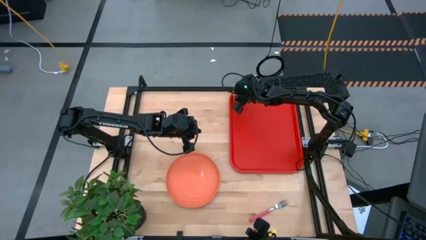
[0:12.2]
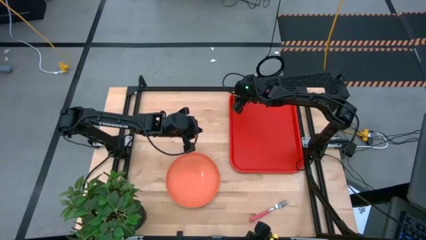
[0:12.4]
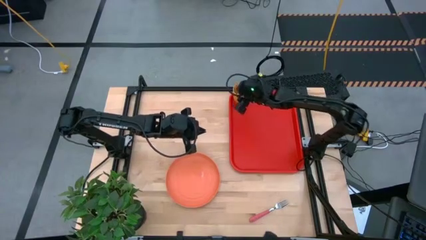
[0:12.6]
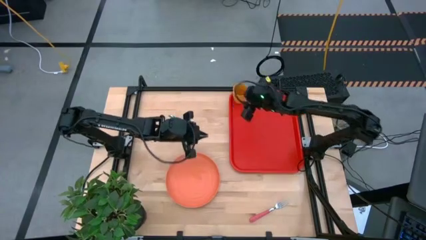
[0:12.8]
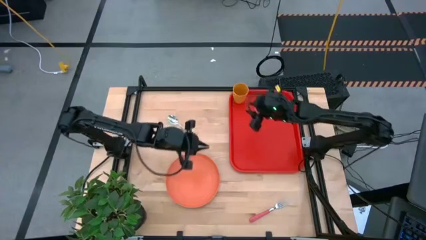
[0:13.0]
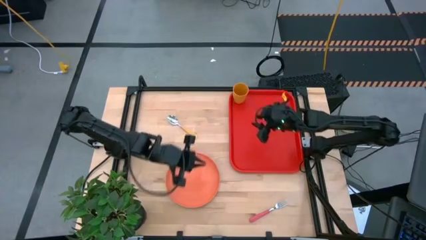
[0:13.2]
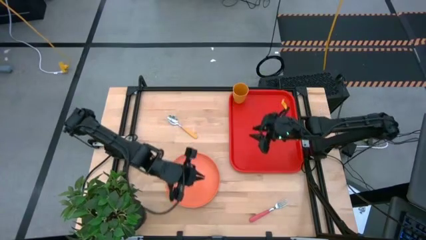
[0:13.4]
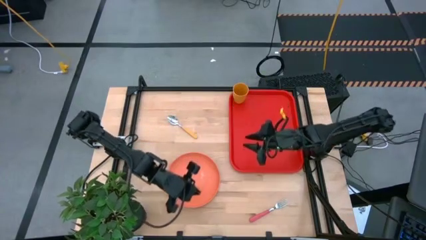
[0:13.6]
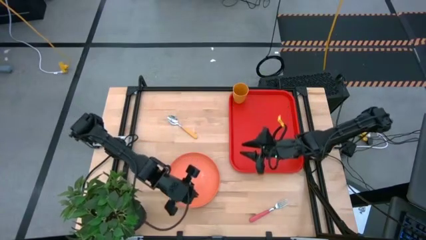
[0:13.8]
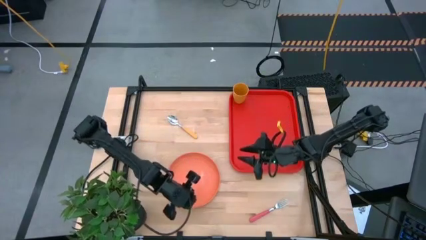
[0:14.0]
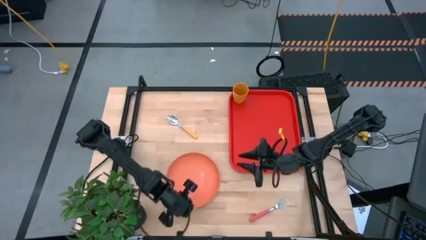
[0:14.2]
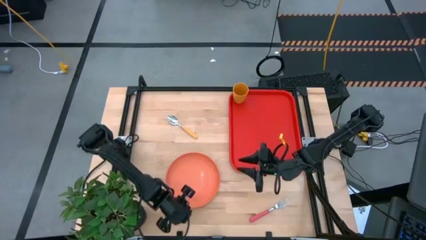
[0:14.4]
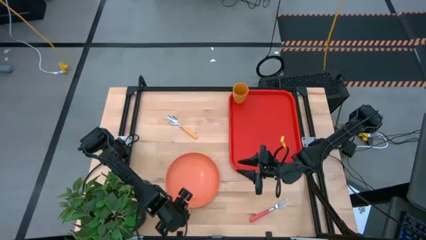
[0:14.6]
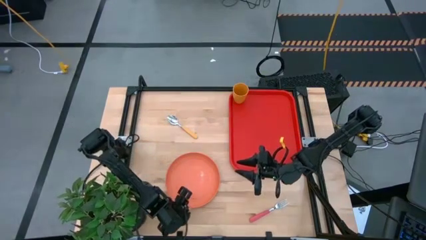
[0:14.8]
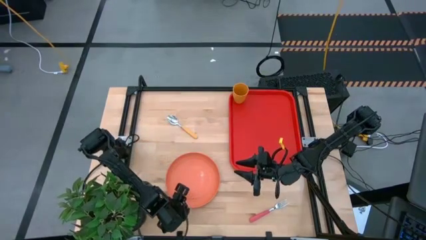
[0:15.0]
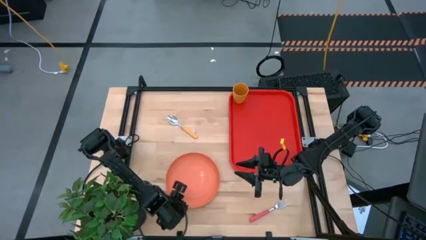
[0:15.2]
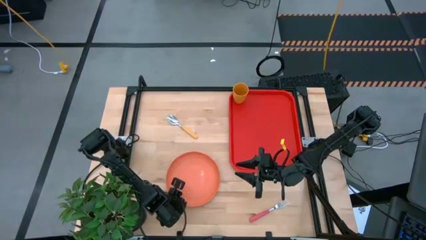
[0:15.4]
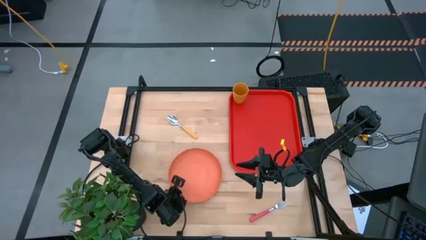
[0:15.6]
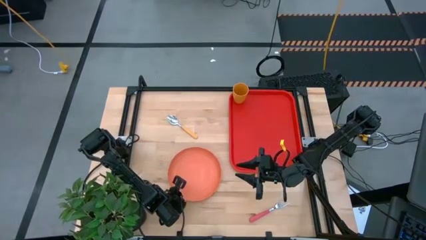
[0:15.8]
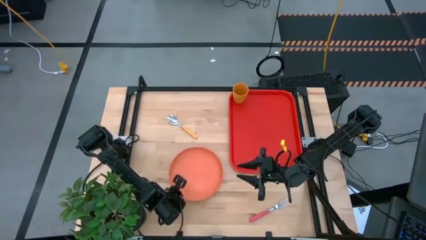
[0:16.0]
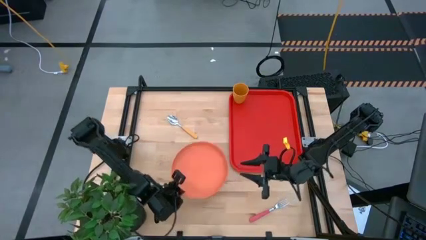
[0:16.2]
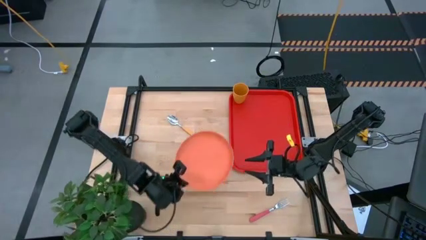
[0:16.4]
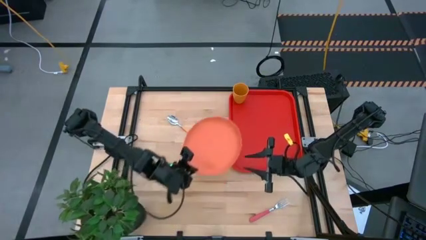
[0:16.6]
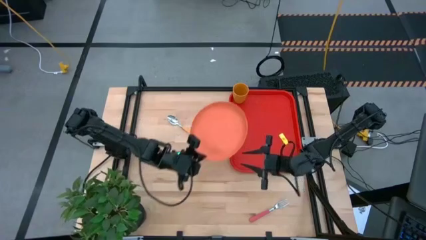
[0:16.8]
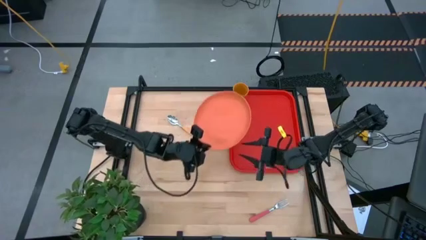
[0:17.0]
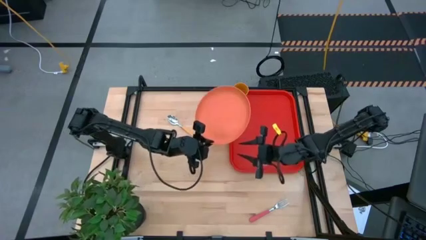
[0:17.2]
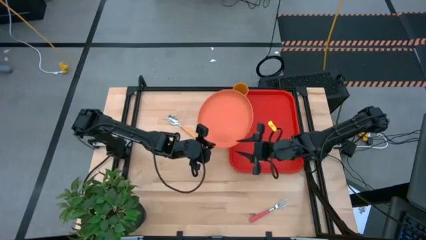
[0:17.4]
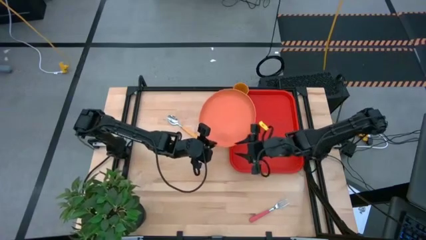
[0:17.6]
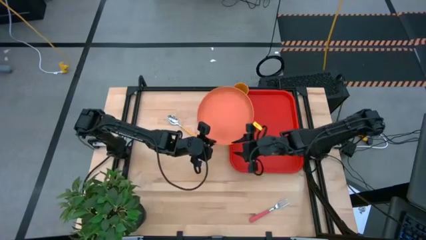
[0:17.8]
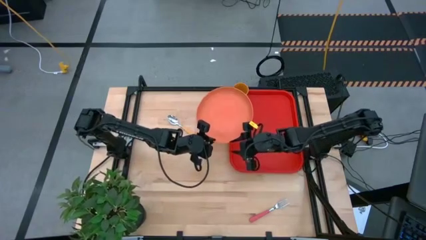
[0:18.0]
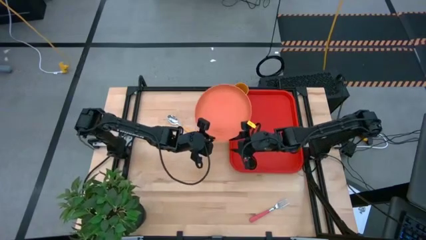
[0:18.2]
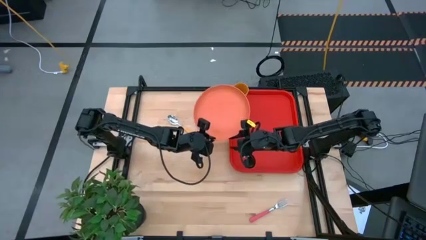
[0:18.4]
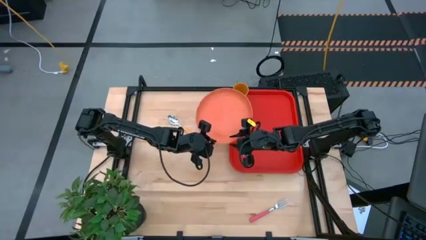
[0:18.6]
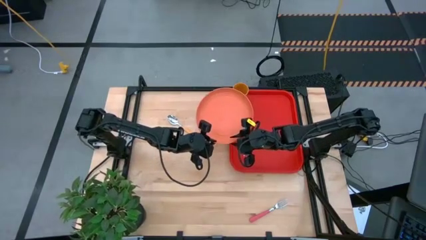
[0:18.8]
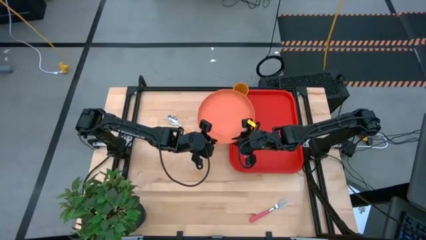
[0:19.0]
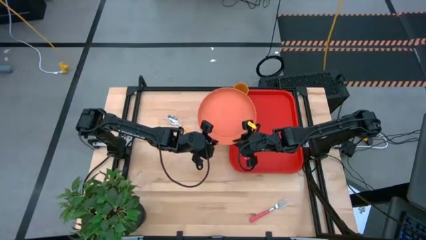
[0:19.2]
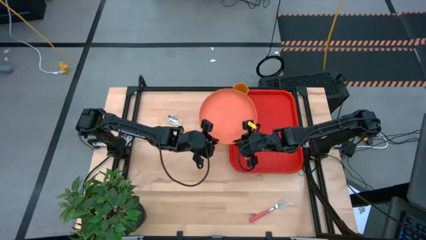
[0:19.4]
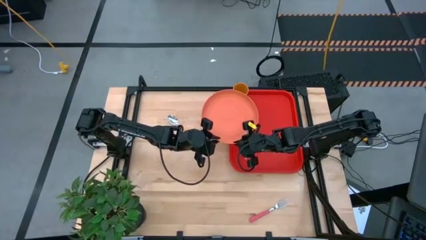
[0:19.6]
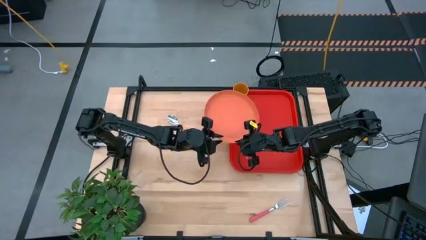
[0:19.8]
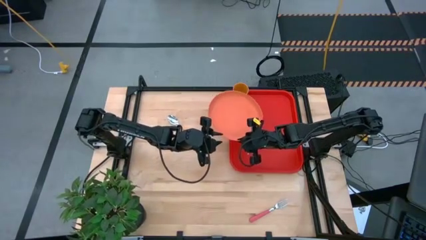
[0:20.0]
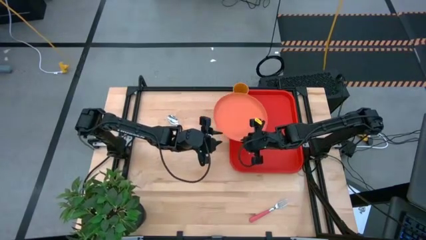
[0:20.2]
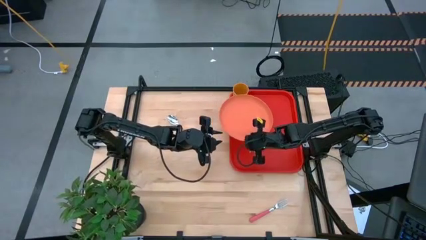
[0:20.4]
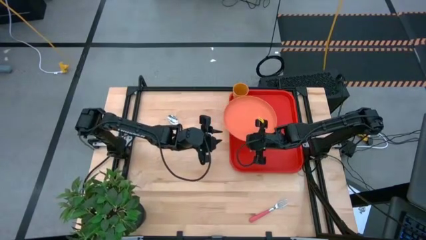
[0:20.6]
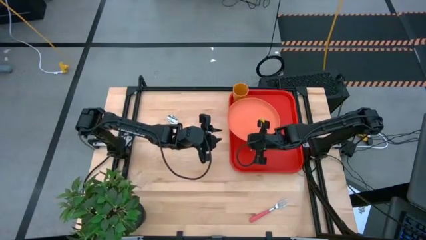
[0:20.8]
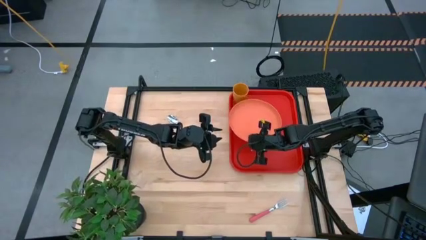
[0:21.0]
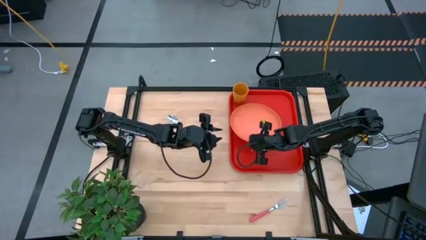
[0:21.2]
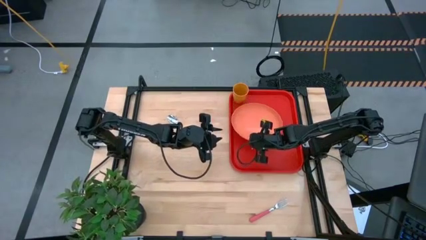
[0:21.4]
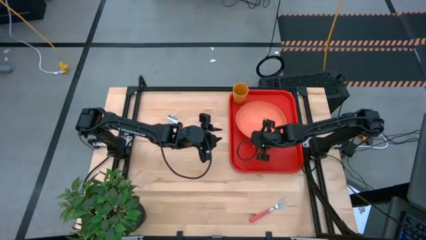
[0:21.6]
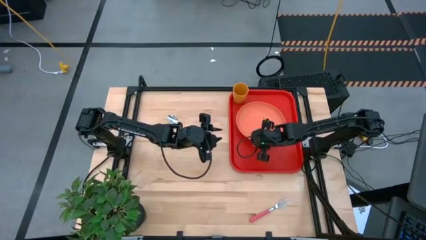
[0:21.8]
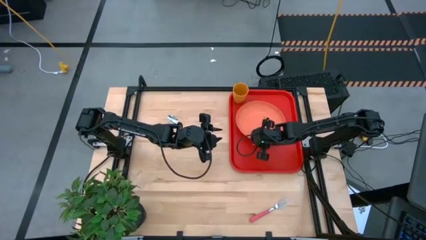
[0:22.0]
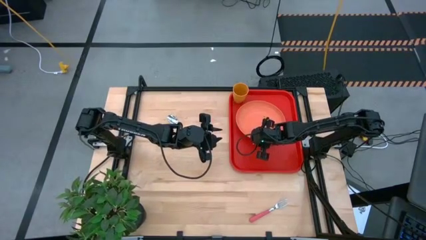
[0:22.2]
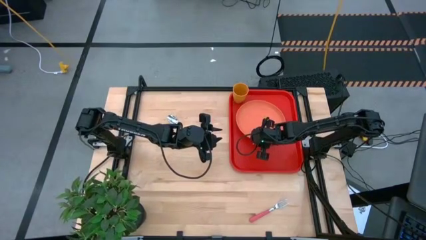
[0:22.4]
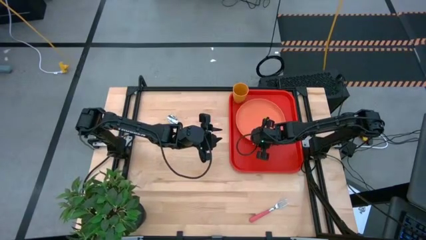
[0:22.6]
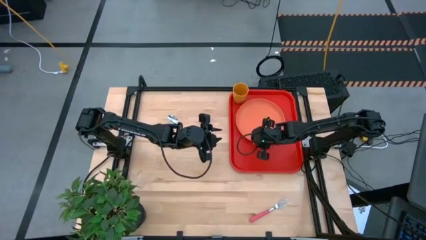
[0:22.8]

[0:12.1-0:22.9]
Task: Pick and place plate/cup/fork/spoon on tray
Put the orange plate on the red table tray to the bottom of the orange cup

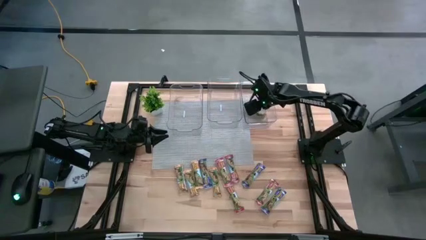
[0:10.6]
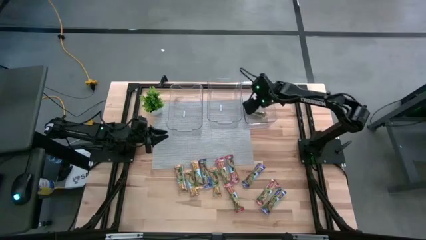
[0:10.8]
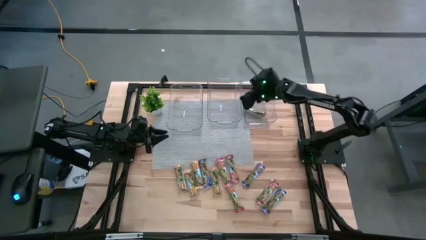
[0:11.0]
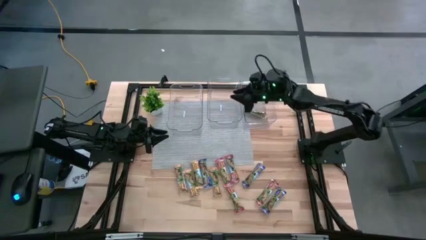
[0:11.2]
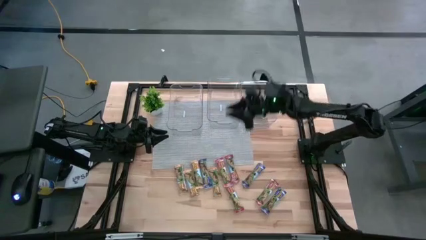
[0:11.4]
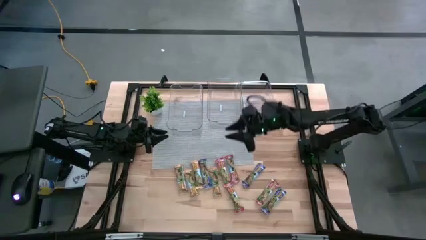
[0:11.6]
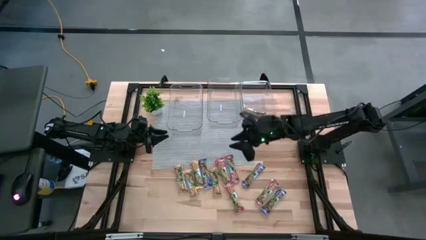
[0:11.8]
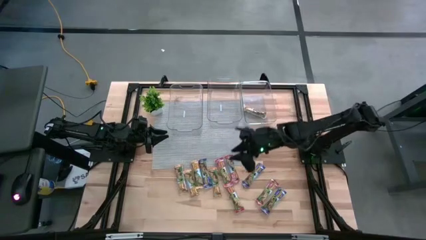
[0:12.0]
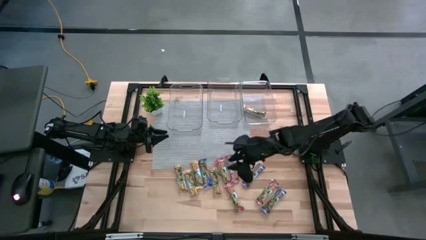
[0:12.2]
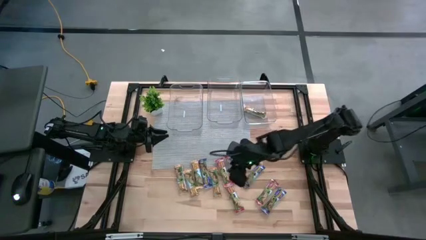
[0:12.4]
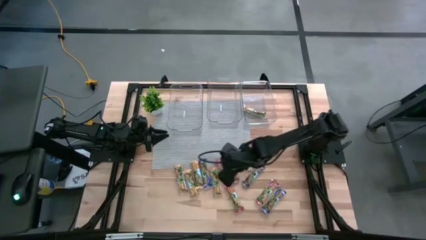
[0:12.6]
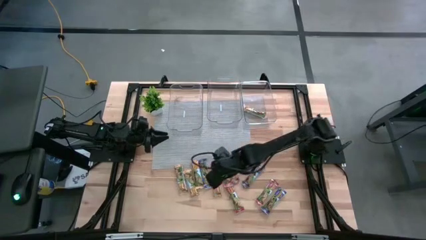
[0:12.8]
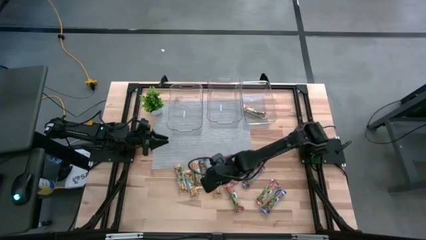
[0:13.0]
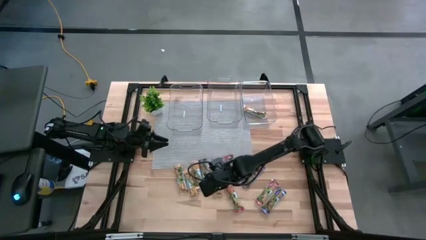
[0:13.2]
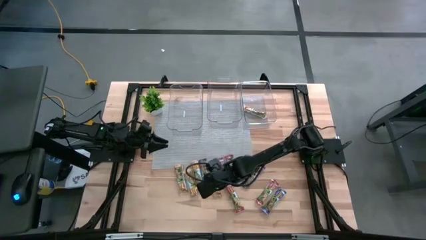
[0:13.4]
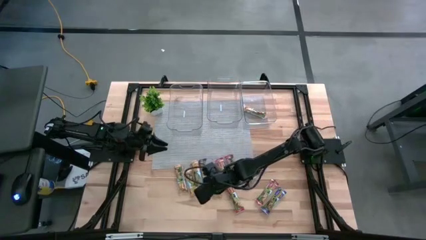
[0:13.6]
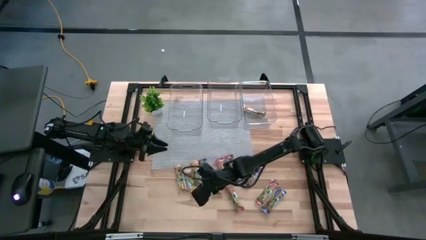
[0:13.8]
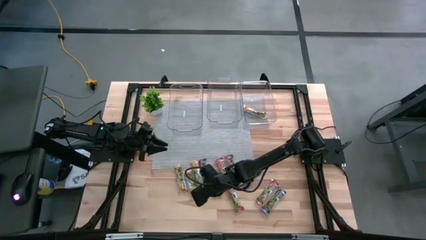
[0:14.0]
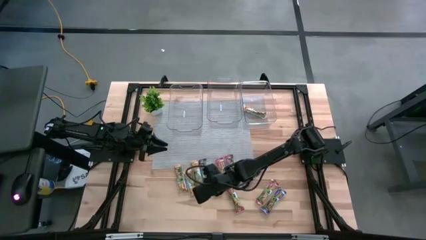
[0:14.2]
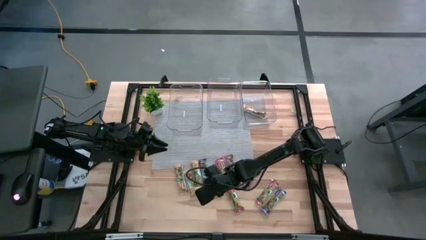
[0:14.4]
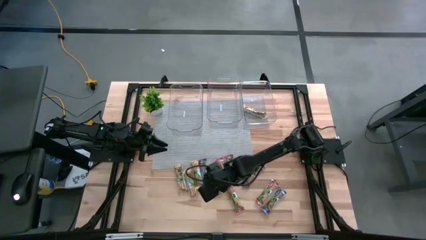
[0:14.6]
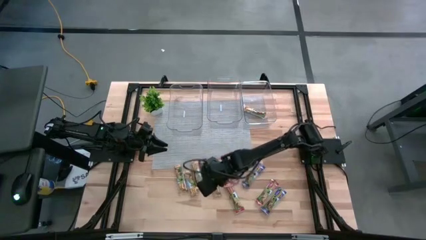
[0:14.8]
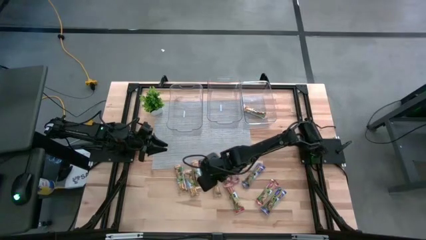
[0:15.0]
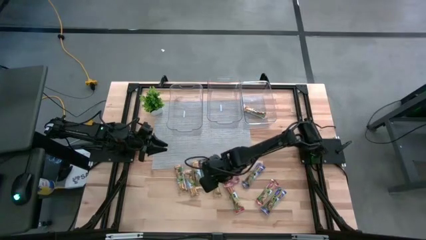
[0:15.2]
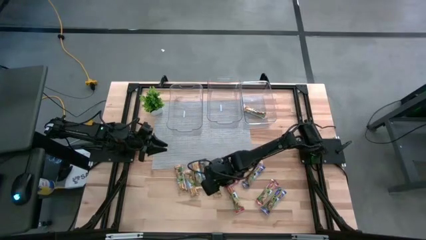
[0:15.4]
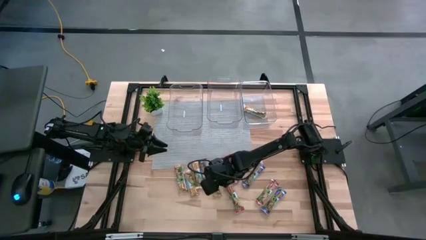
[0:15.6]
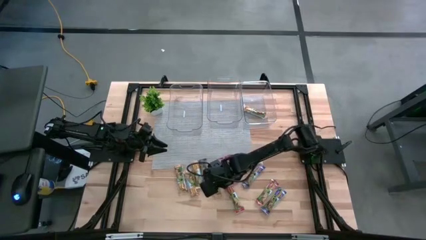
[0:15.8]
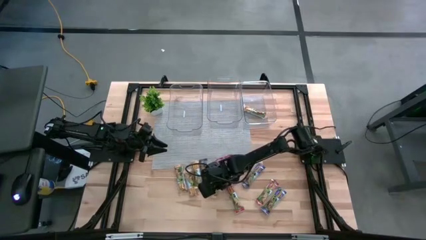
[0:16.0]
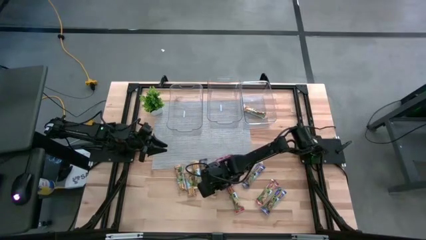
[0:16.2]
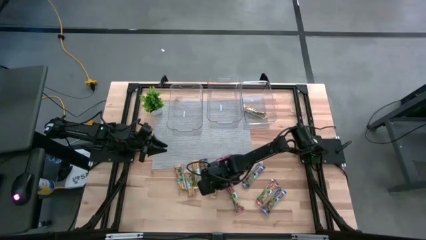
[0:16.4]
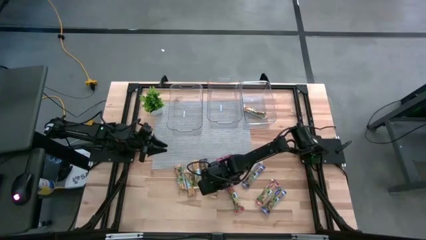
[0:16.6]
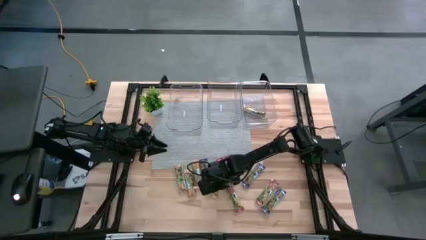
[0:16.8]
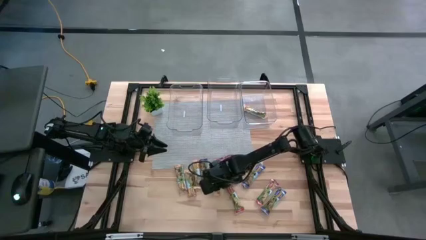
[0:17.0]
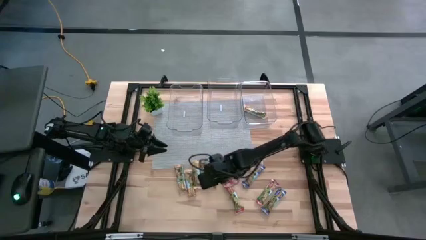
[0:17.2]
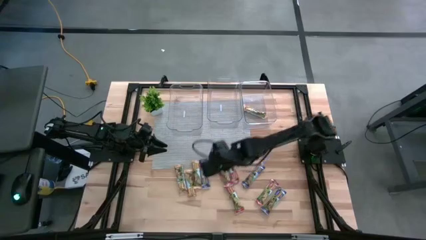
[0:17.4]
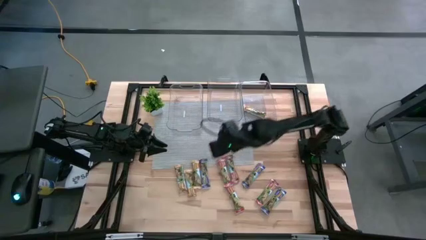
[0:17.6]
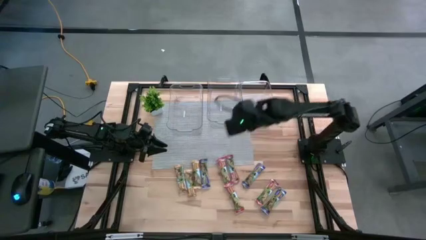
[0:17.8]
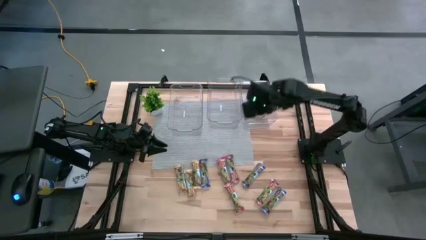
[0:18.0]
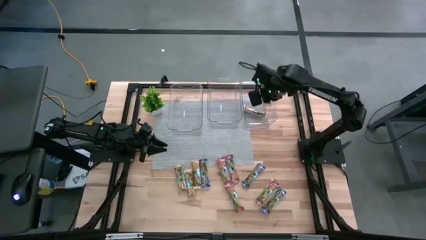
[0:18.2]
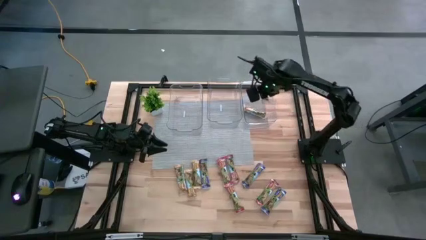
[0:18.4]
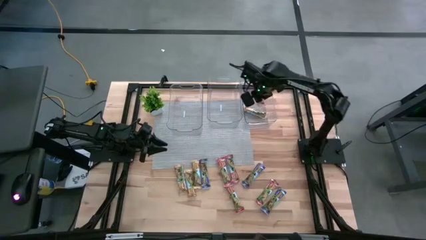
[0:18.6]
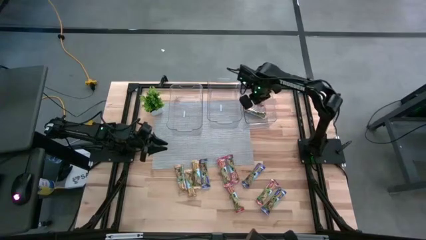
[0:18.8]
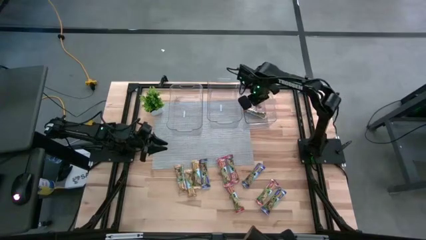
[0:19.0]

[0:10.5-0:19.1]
Task: Pick and place Granola Bars by type
Put the yellow granola bar into the right transparent bin
